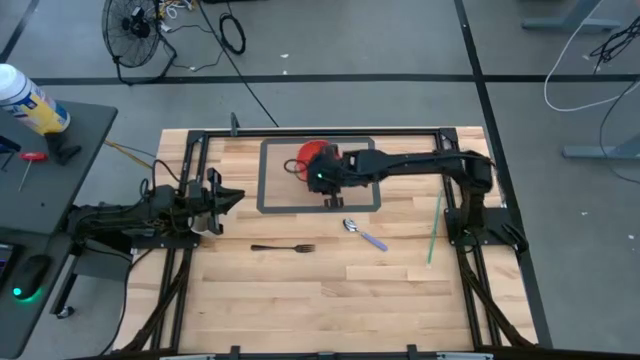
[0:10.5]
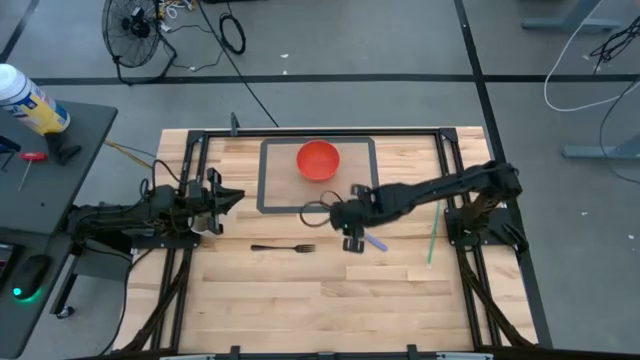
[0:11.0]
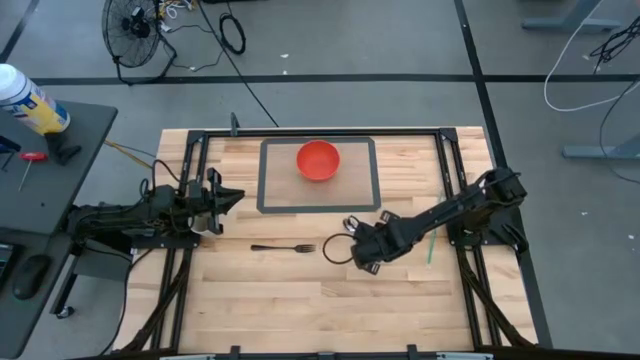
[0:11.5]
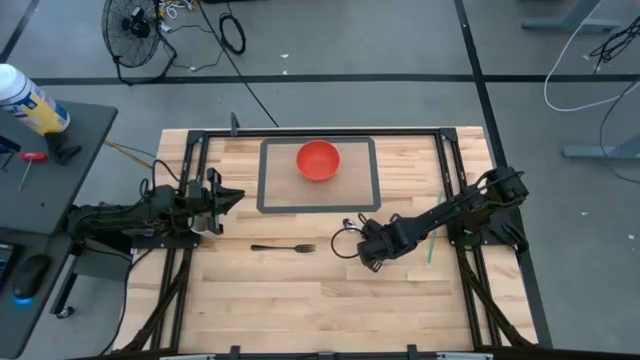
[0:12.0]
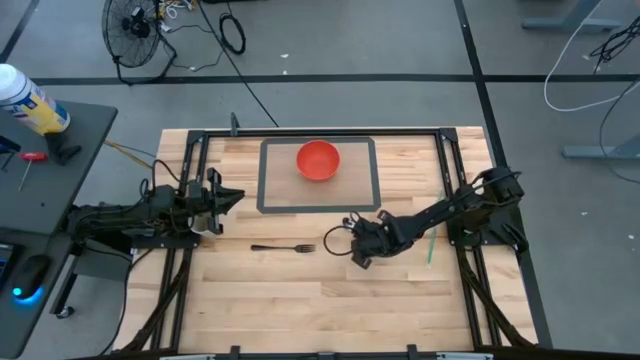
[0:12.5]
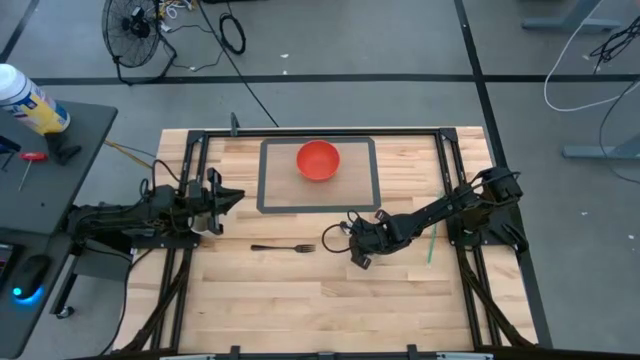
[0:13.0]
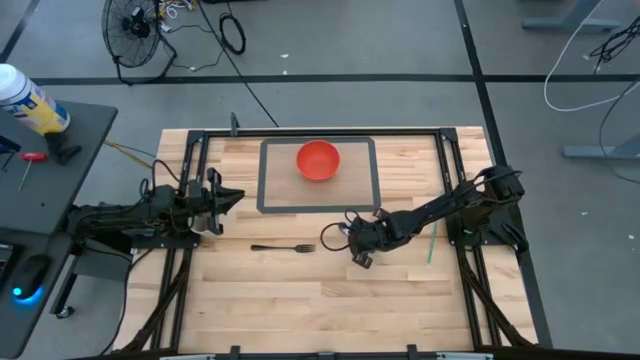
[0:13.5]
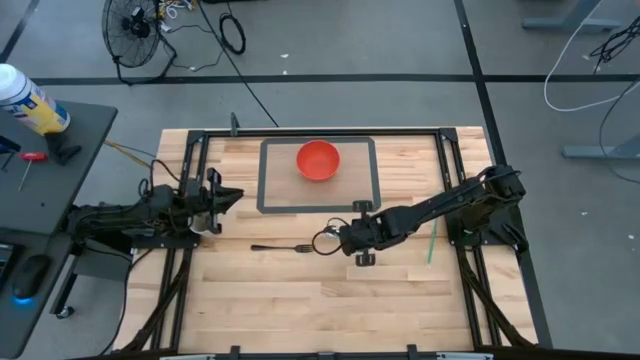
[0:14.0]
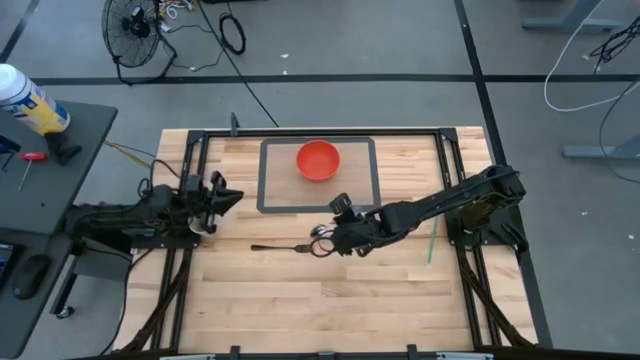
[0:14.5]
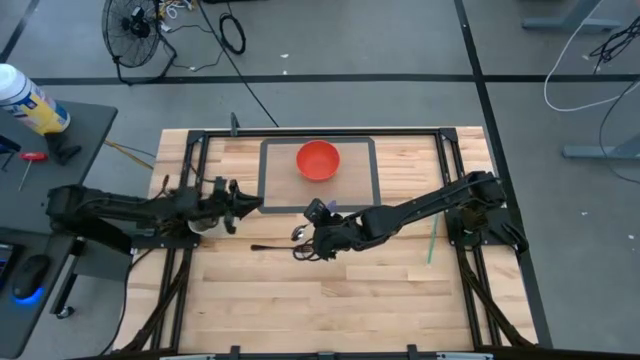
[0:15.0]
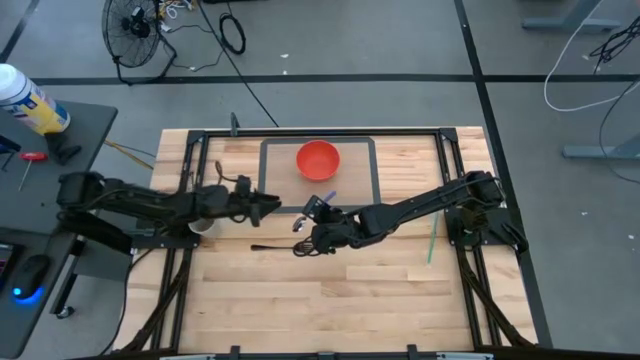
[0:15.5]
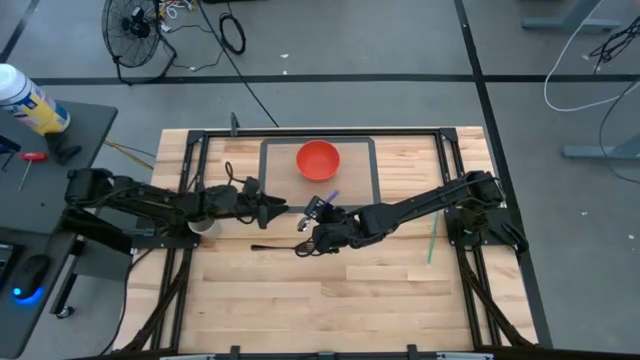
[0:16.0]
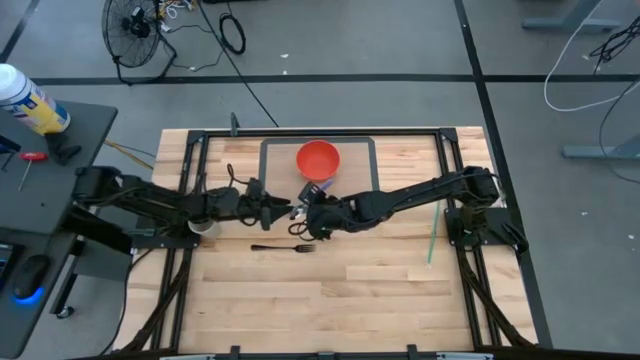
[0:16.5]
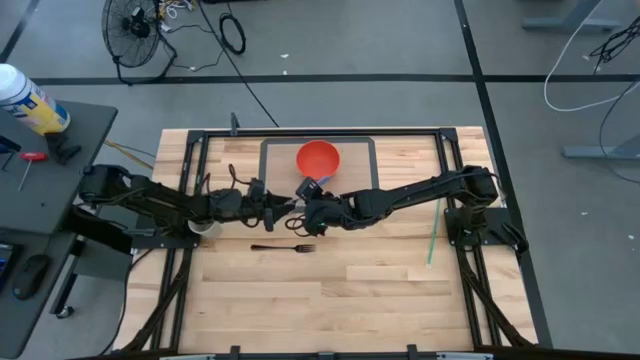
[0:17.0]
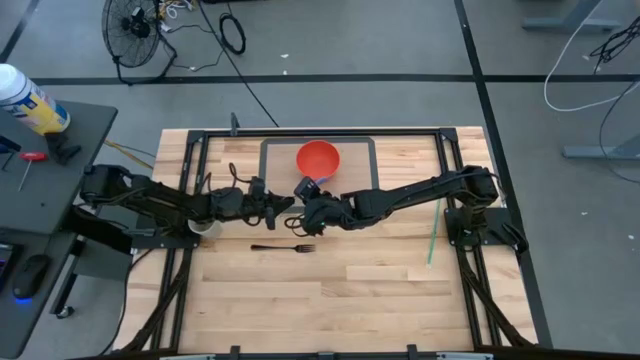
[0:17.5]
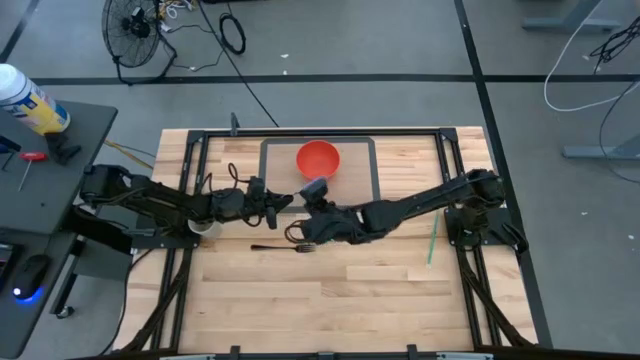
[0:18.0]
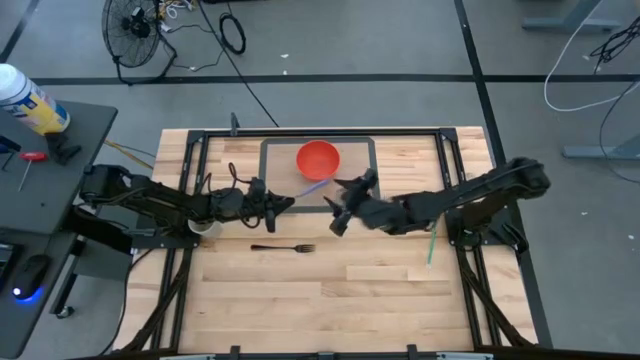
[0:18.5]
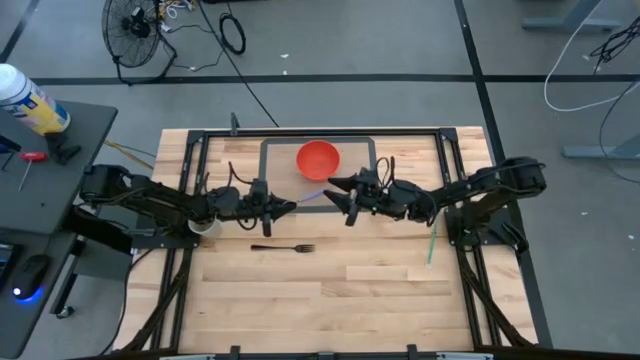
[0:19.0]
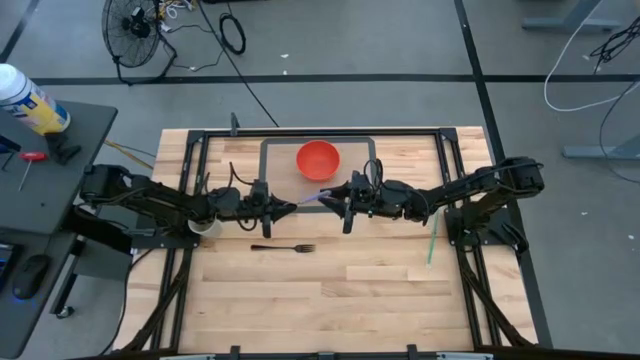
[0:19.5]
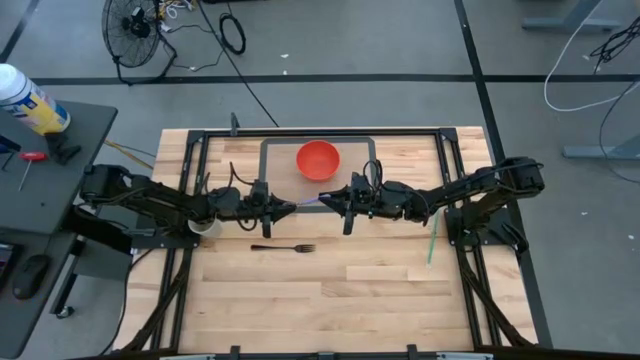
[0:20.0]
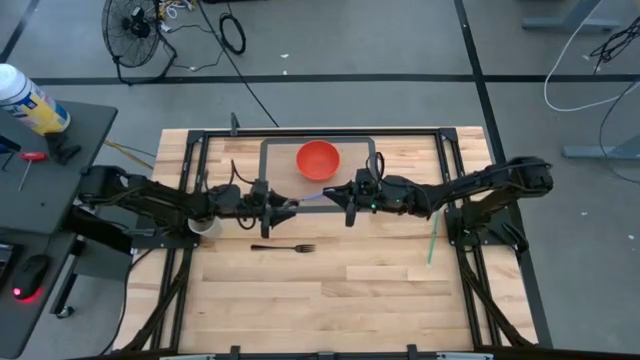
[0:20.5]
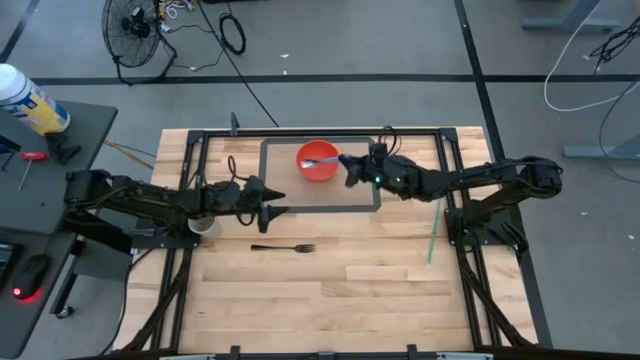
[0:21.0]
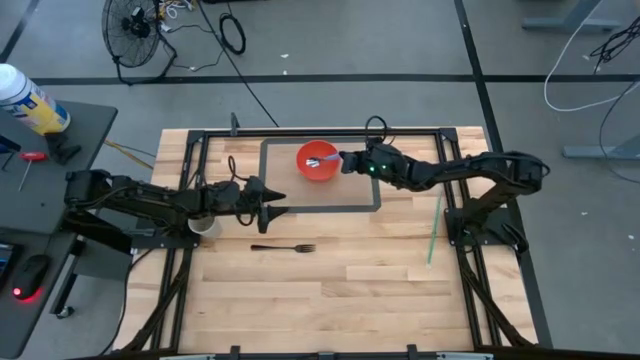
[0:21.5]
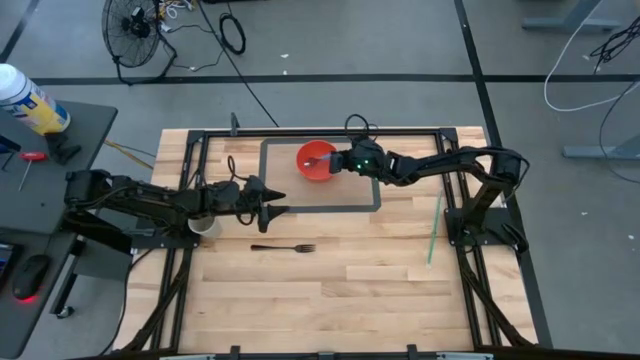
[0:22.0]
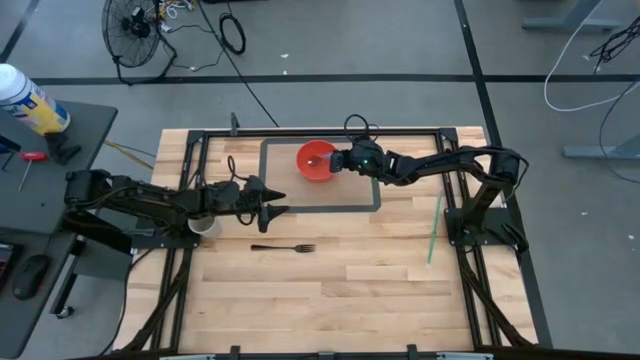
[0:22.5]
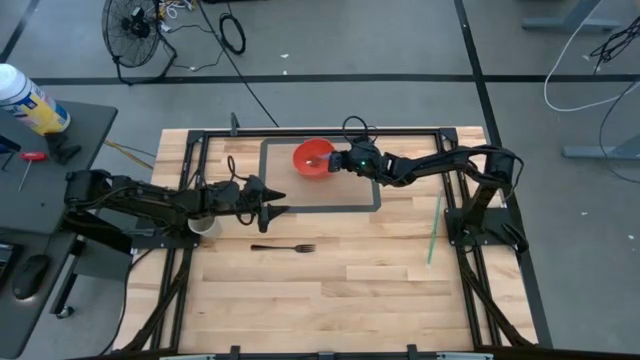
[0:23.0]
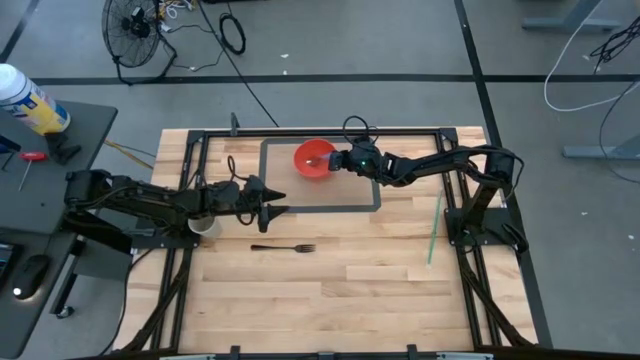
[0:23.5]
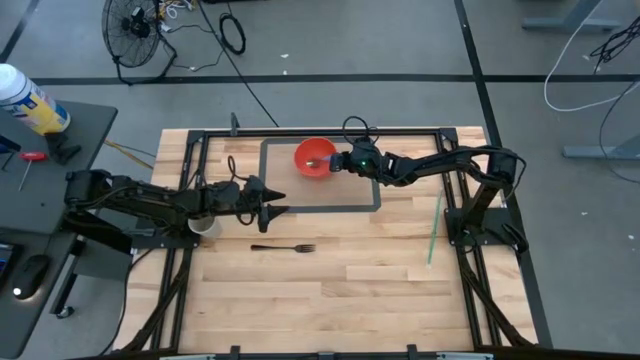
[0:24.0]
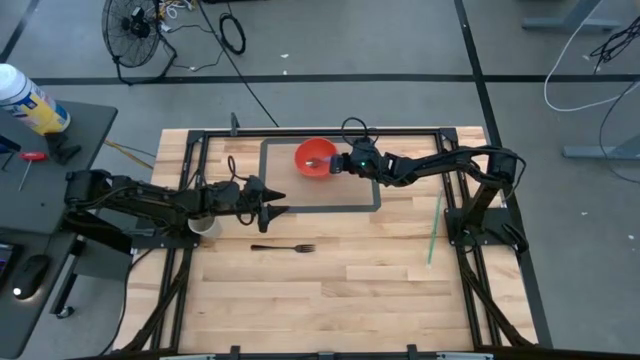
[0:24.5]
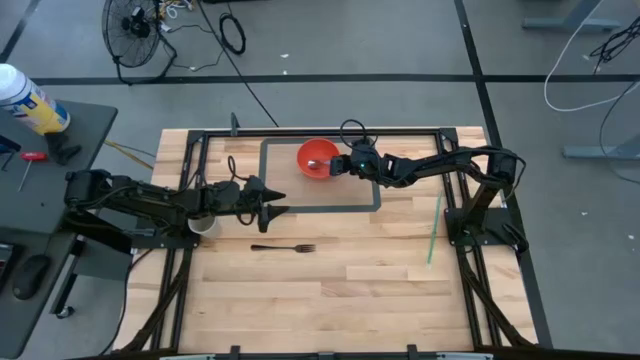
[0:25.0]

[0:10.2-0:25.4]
Task: Pick & Place Utensil
Put the purple spoon into the orange bowl
